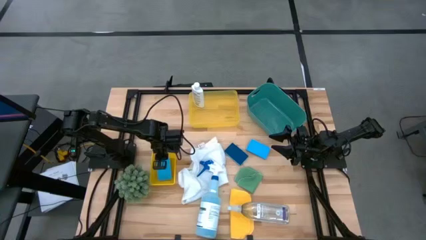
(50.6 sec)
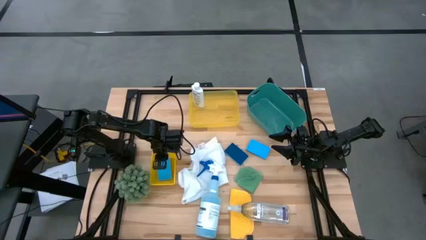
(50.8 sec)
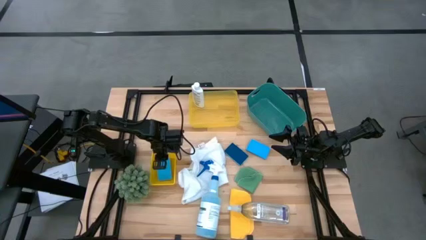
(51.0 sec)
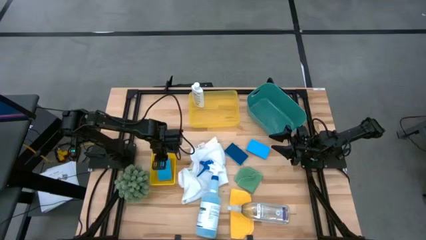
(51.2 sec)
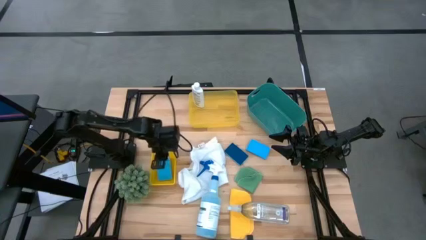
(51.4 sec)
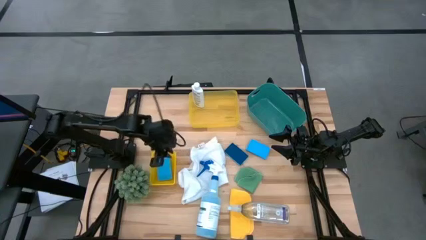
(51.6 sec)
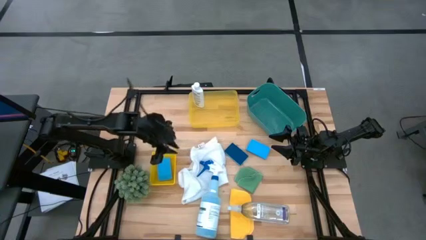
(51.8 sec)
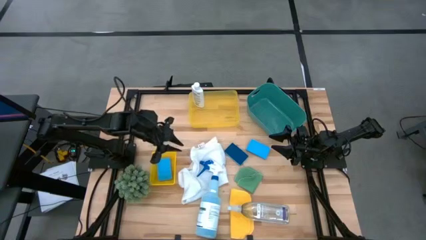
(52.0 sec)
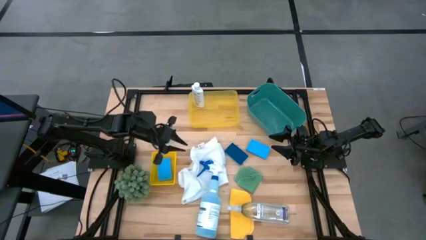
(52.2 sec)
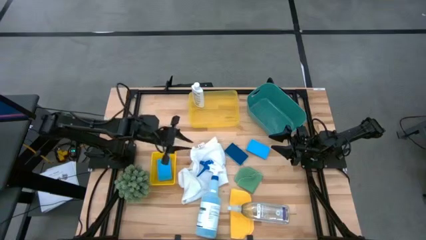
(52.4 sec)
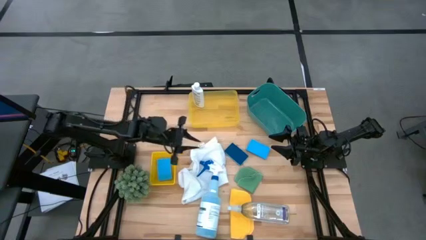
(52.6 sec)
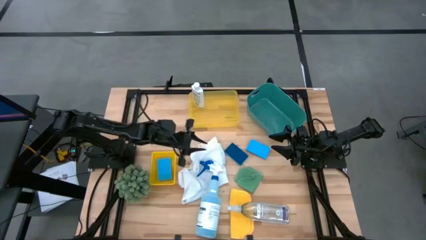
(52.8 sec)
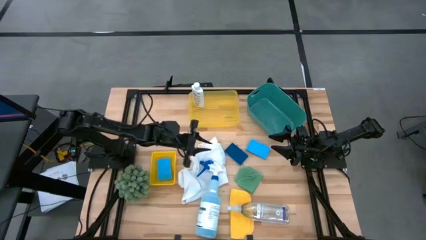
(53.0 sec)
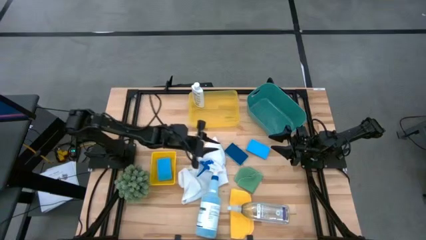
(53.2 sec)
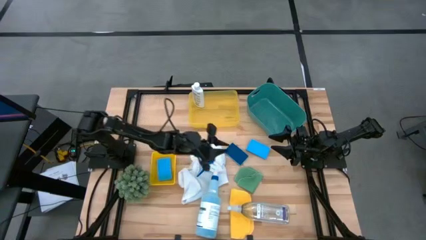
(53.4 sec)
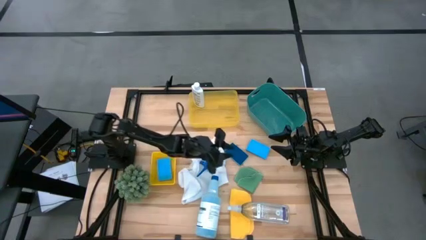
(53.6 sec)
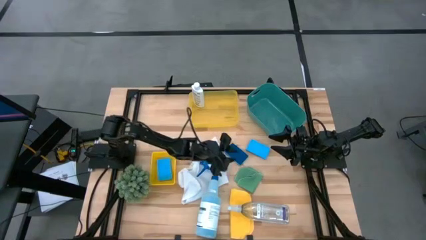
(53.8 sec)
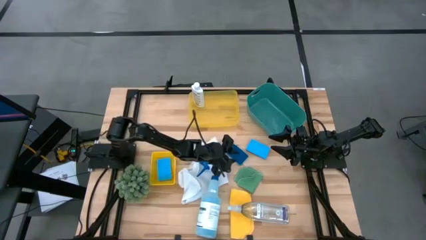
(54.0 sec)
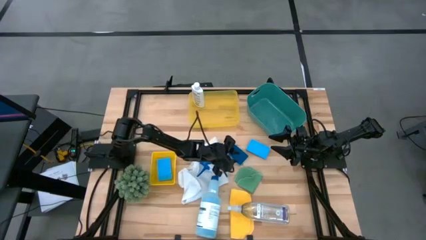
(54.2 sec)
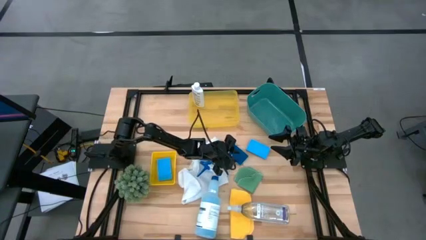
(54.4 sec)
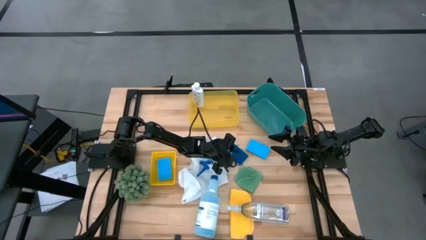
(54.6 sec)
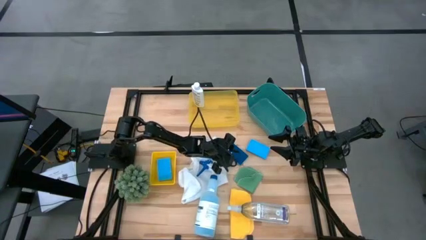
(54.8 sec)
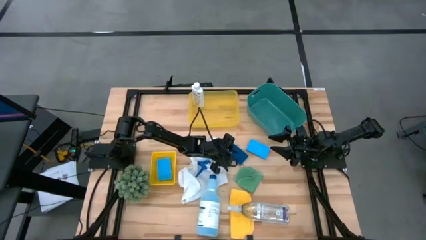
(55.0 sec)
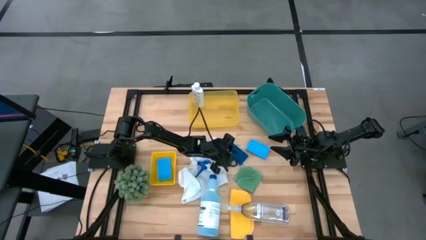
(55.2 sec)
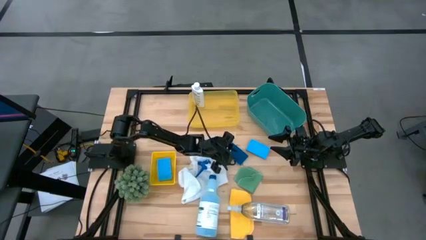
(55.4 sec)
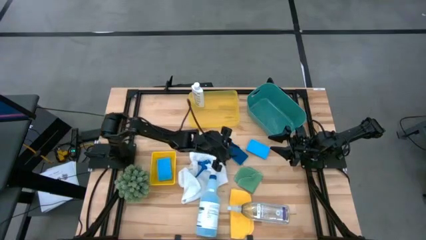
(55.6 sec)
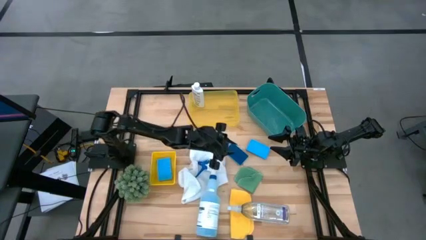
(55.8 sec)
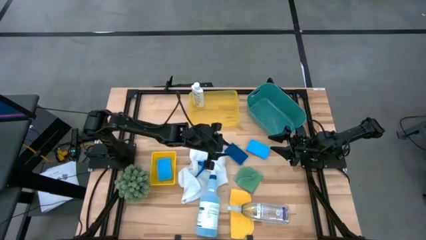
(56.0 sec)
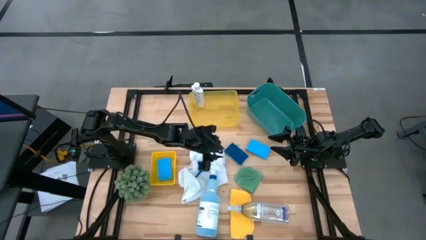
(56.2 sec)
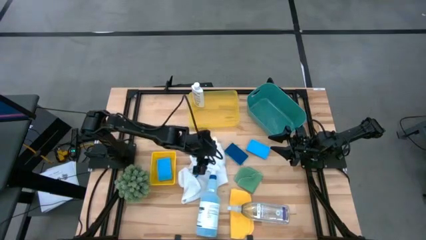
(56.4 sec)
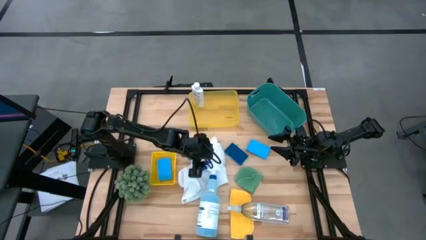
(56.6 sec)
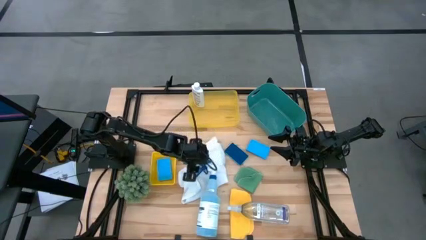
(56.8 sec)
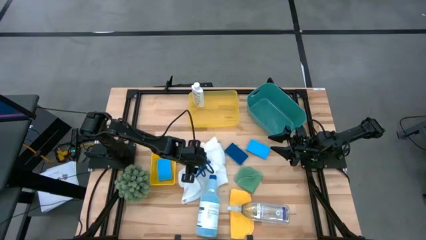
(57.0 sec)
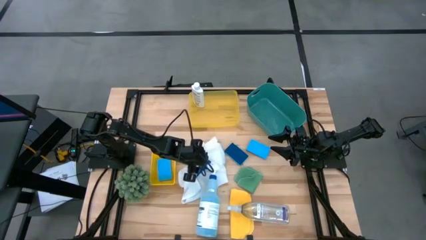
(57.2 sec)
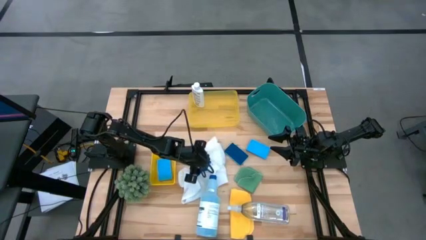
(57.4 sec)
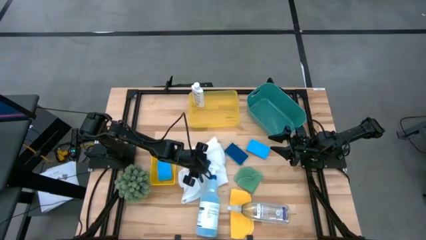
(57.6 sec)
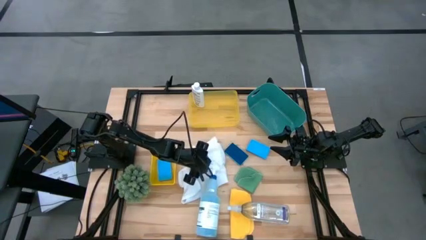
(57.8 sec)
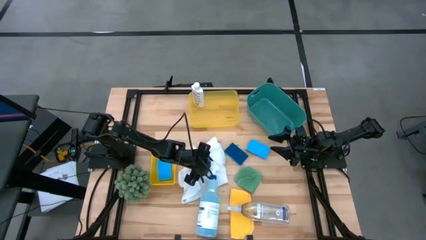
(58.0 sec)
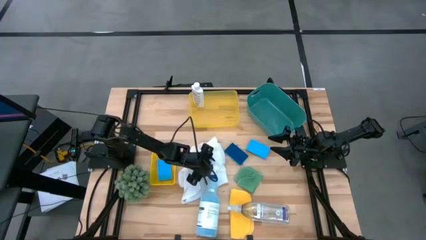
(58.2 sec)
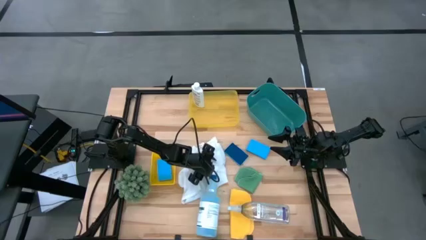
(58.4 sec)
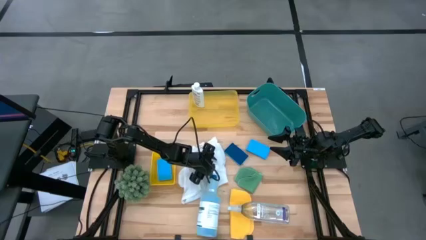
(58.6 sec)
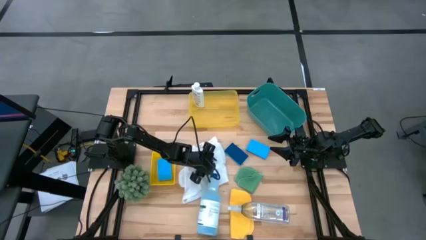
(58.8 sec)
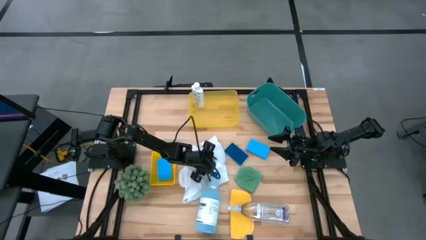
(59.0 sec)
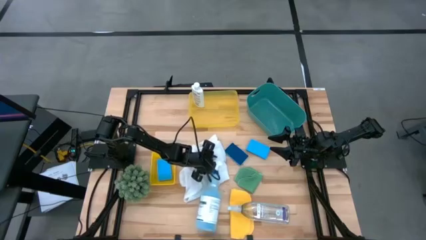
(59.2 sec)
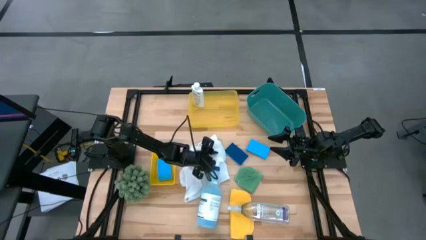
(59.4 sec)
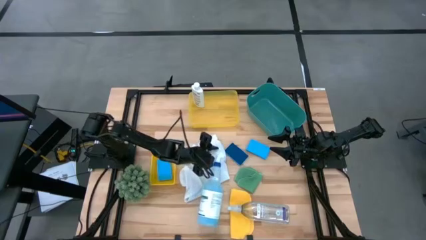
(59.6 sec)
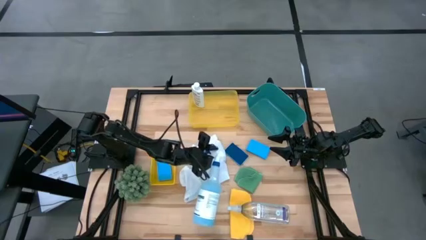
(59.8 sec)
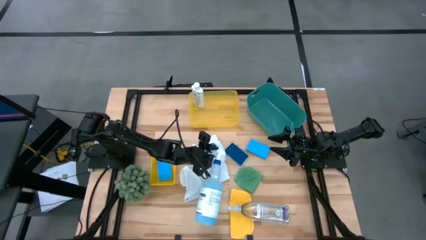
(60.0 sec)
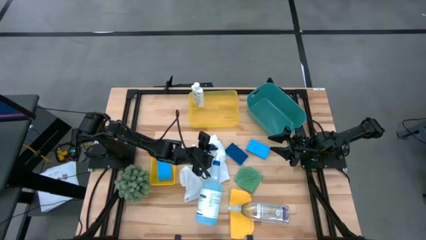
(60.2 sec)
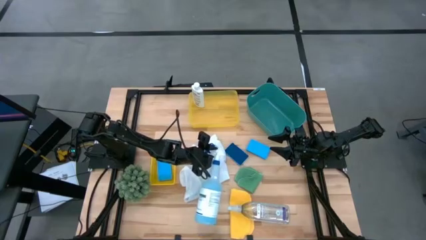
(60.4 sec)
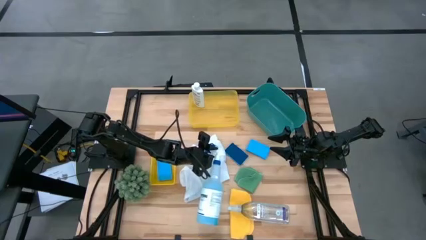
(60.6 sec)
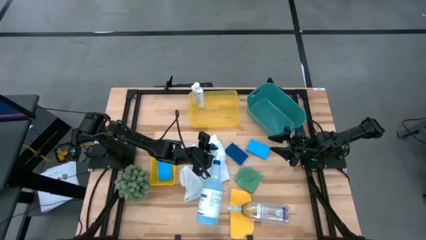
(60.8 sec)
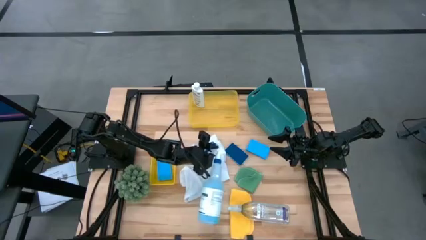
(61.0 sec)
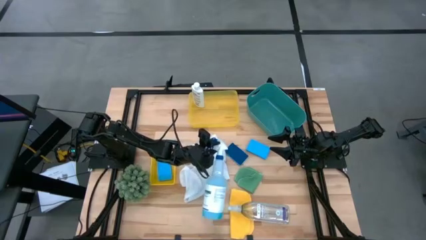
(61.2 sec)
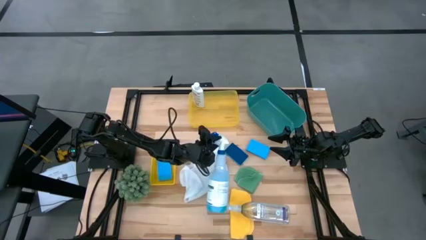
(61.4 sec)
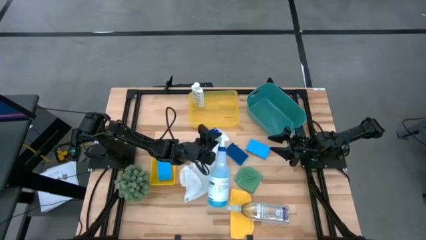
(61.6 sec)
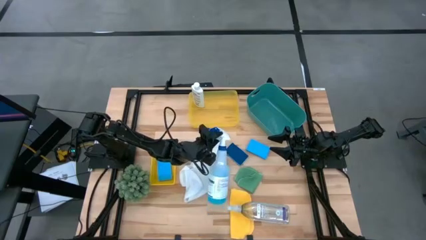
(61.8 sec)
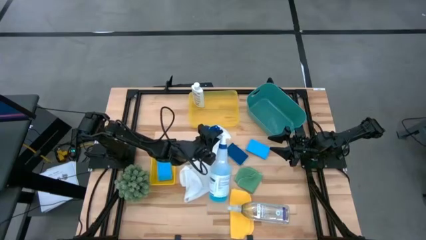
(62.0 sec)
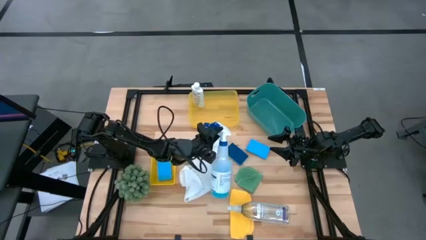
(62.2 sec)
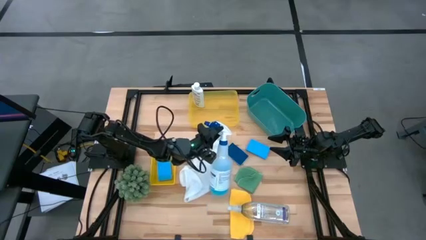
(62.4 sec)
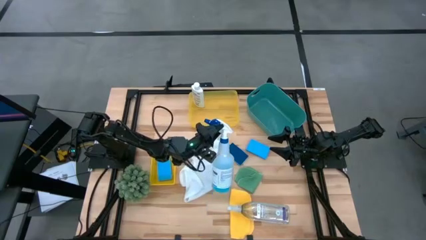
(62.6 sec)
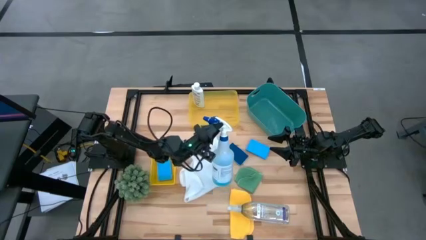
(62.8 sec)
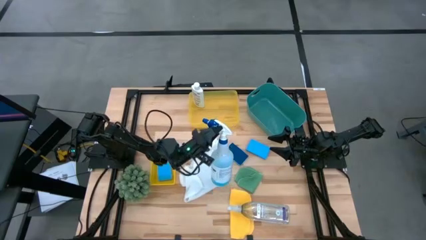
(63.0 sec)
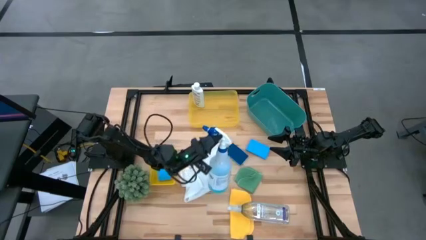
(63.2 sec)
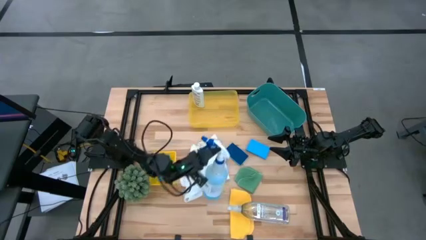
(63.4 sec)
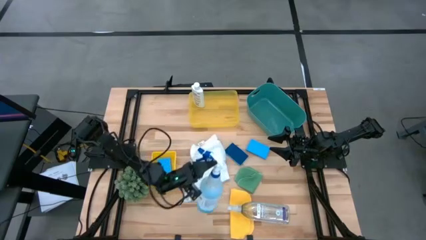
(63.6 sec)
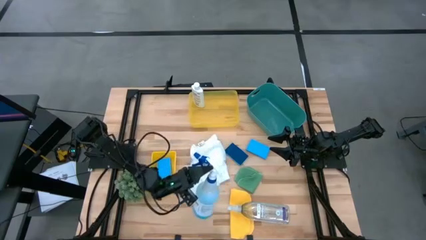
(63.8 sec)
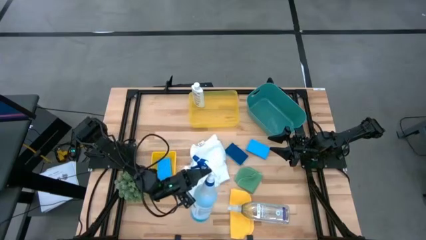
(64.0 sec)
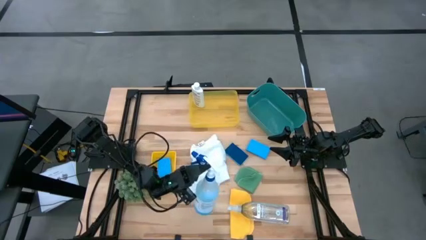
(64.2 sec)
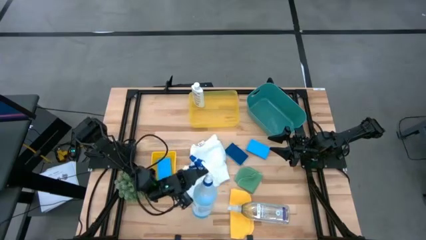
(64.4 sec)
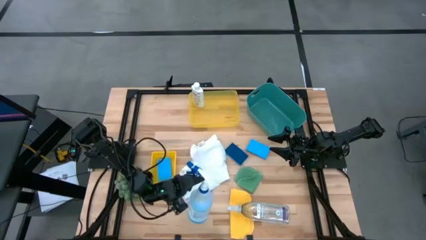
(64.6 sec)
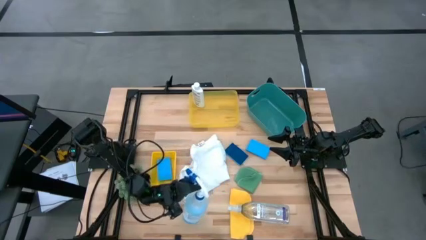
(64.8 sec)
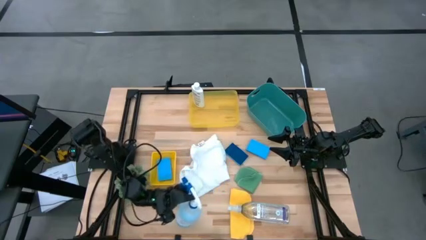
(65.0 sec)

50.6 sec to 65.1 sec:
Task: Pick & Place Kitchen Items
Put the white spray bottle into the top yellow bin

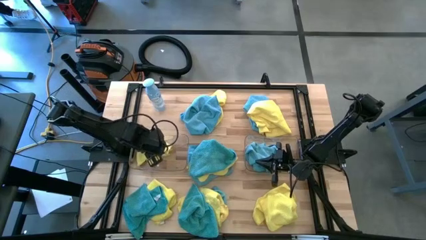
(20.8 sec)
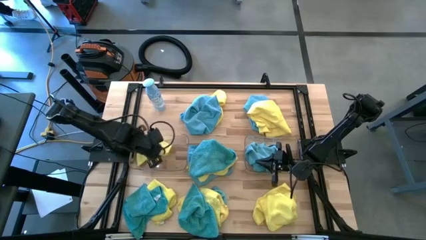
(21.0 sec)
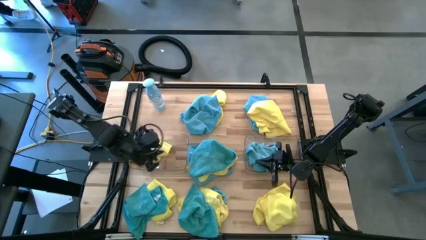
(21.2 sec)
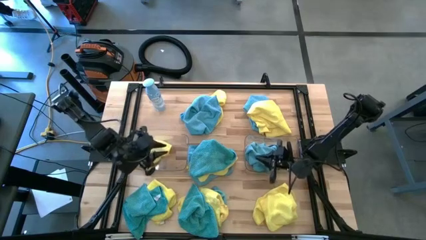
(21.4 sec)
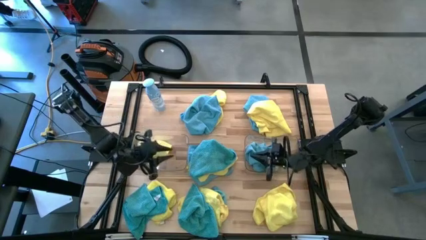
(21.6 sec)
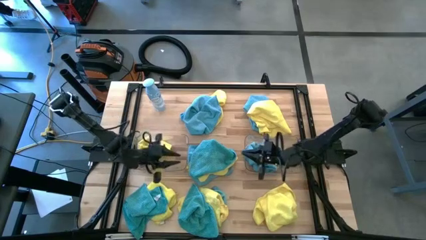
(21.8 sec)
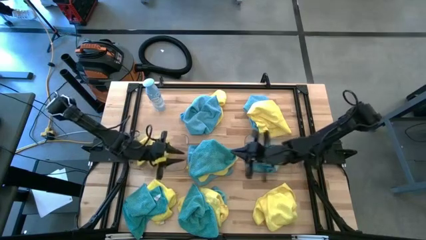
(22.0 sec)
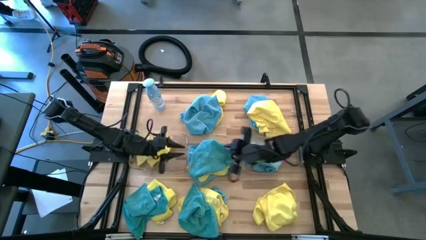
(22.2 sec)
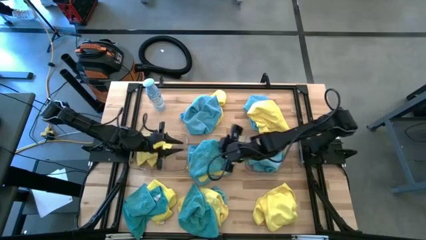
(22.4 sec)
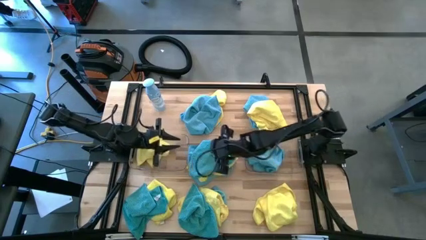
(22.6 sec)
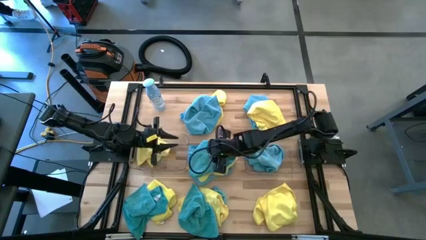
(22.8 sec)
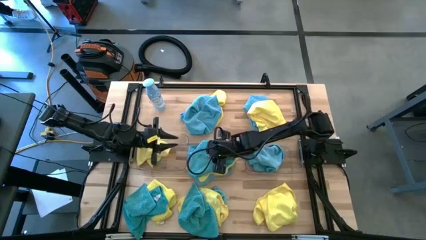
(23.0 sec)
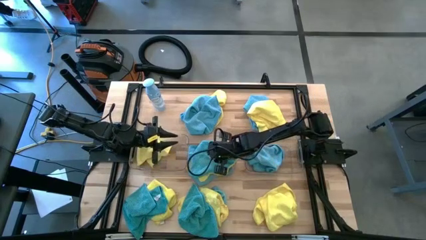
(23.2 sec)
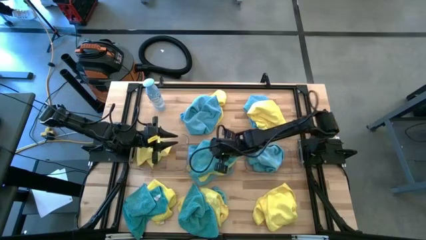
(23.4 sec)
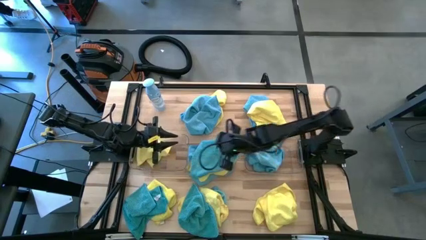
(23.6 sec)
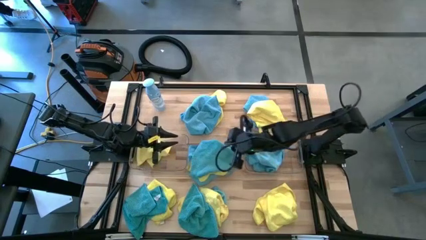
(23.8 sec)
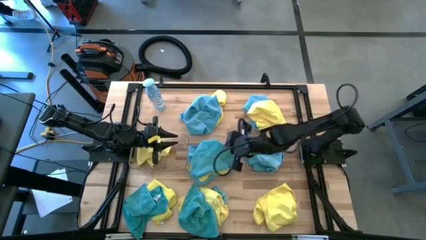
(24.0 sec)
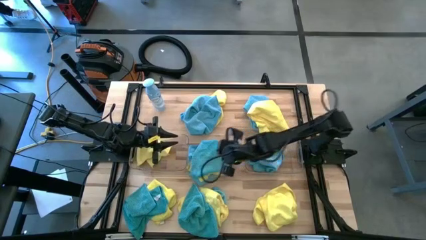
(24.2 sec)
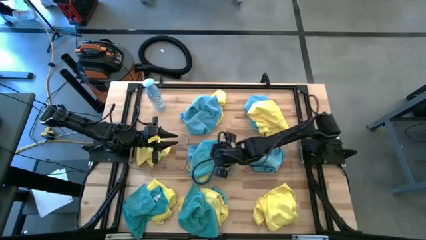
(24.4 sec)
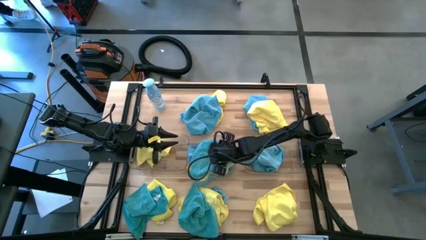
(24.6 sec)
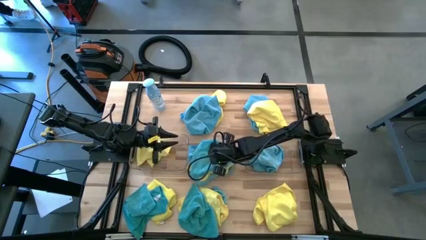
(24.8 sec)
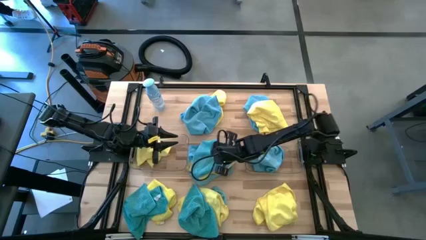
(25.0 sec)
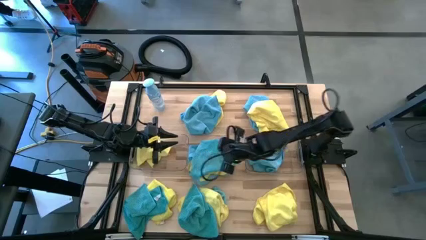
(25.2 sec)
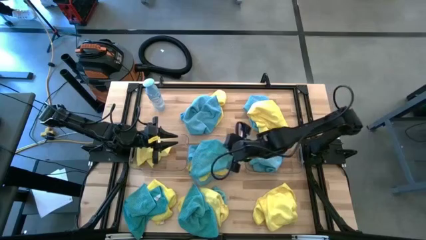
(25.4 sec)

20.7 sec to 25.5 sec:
Task: Sort microfiber towel by color & place in baskets
Put the blue microfiber cloth into the right transparent bin
